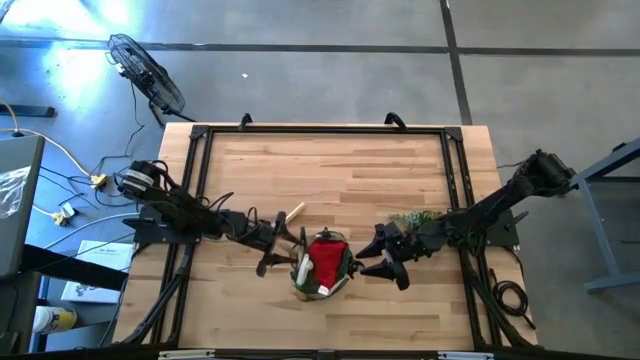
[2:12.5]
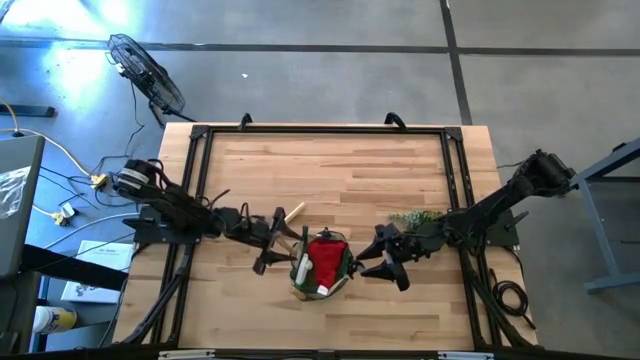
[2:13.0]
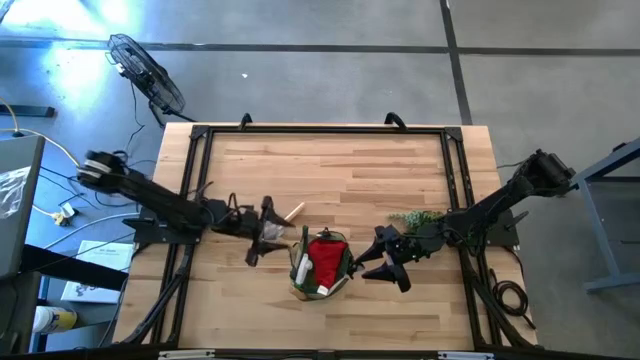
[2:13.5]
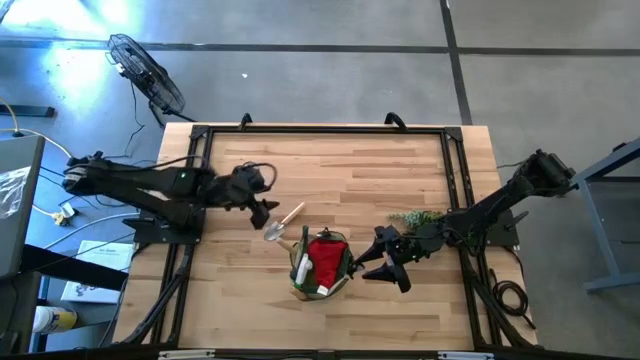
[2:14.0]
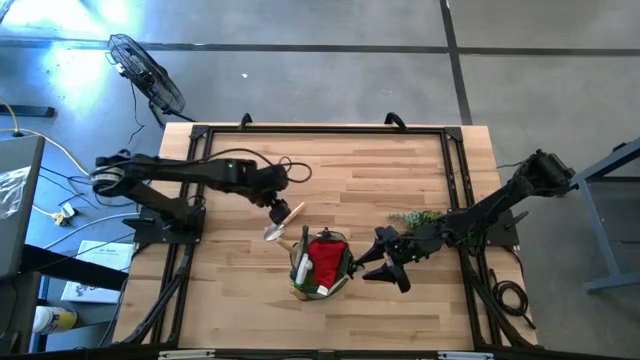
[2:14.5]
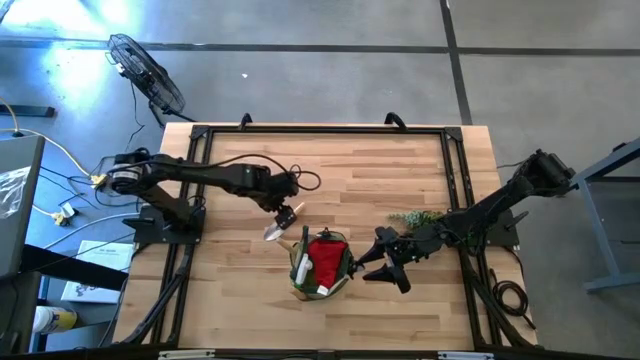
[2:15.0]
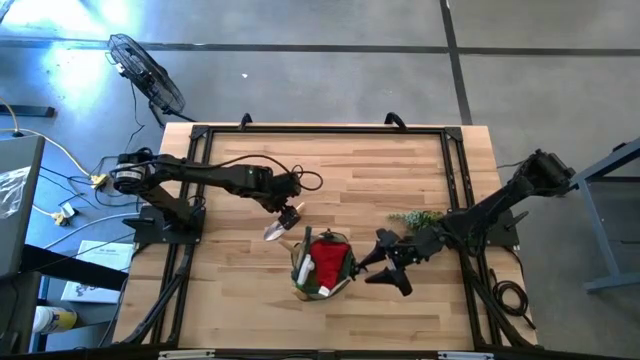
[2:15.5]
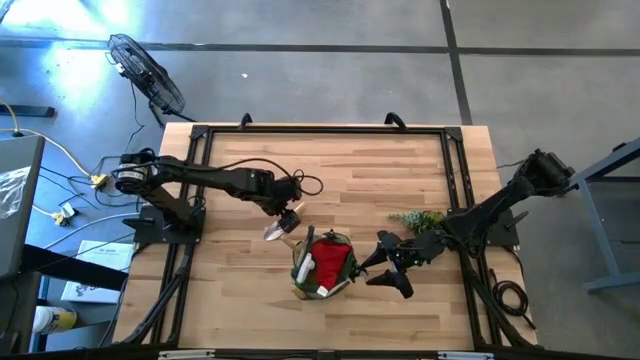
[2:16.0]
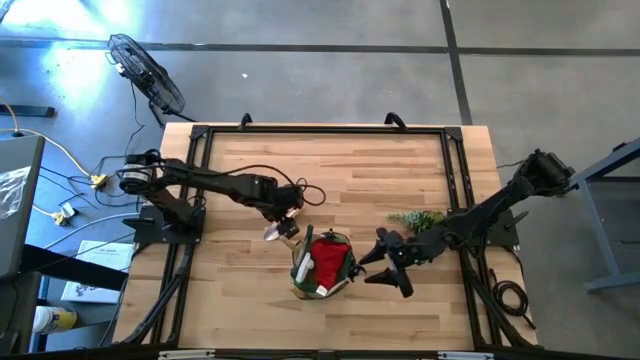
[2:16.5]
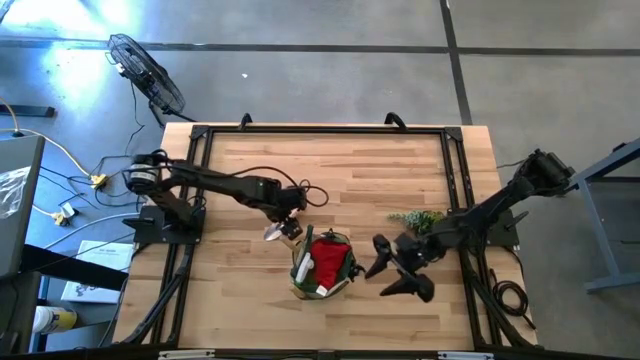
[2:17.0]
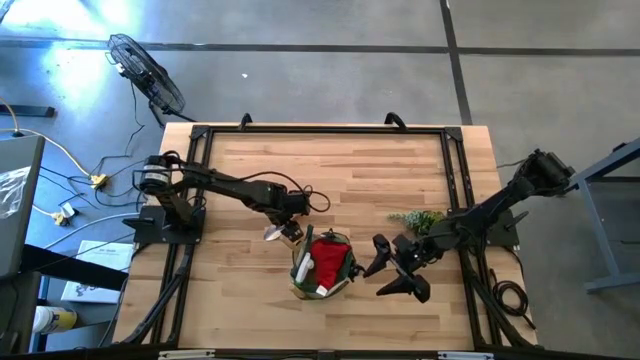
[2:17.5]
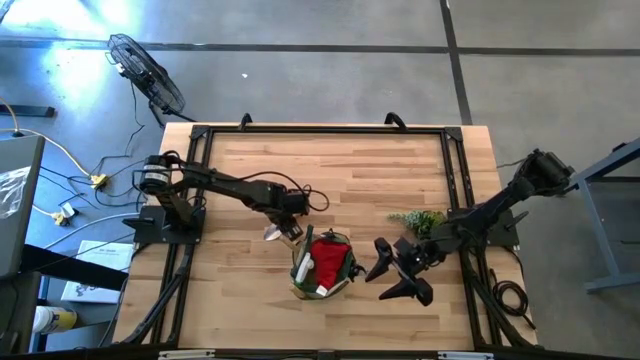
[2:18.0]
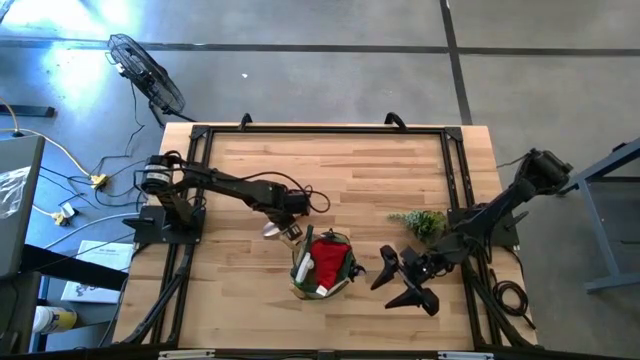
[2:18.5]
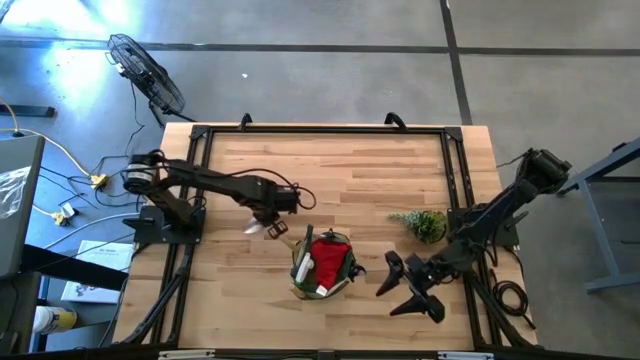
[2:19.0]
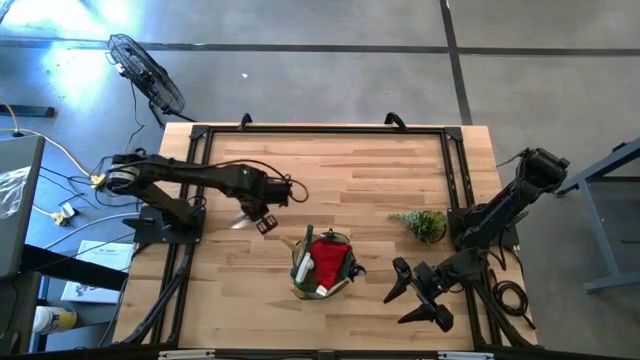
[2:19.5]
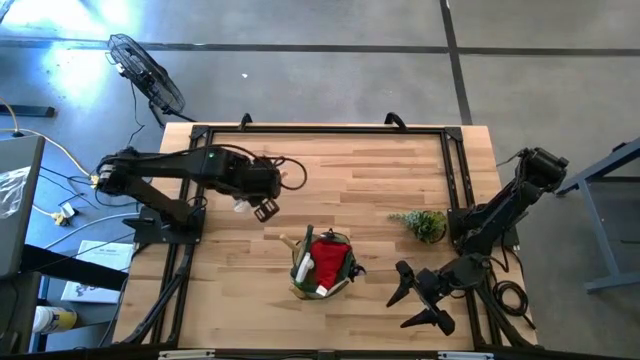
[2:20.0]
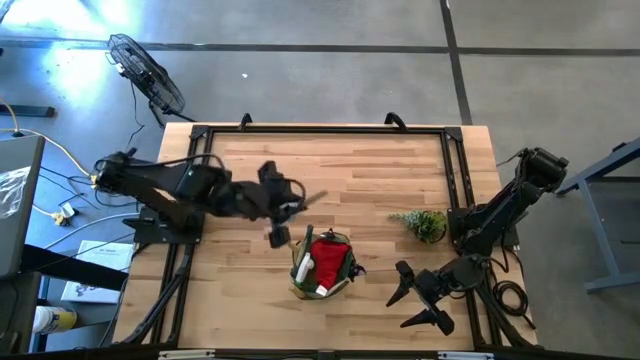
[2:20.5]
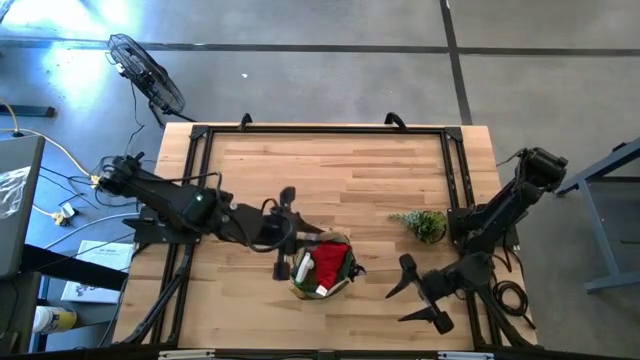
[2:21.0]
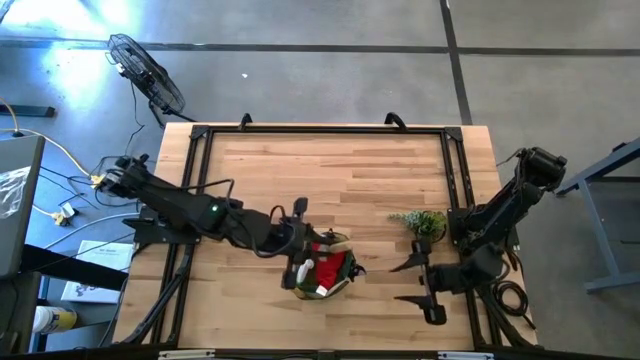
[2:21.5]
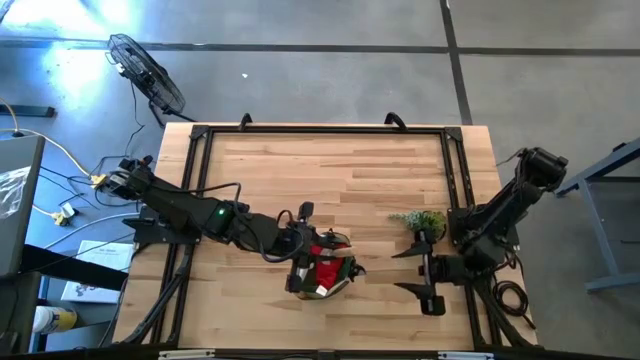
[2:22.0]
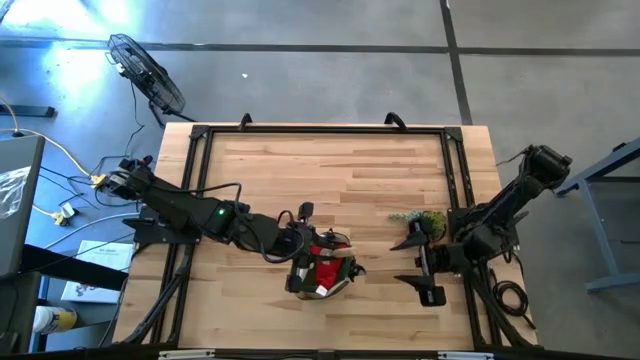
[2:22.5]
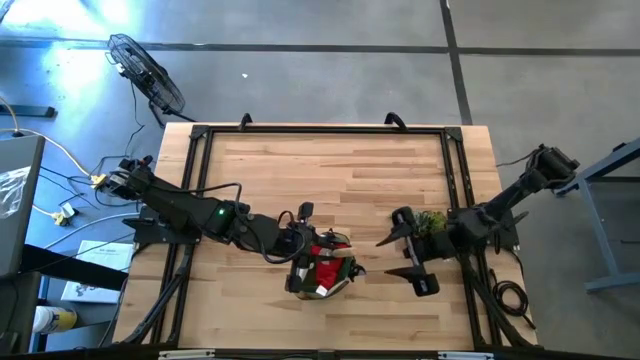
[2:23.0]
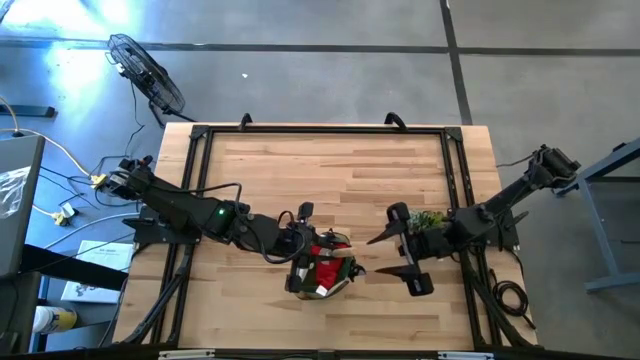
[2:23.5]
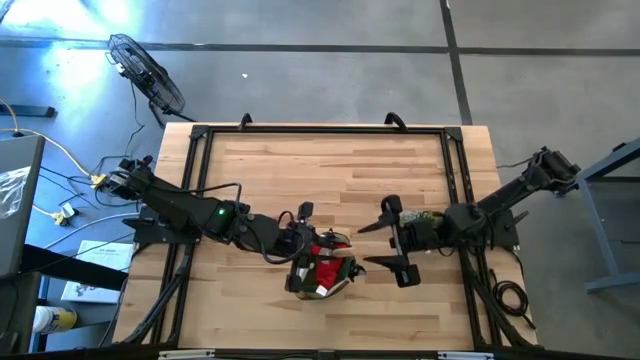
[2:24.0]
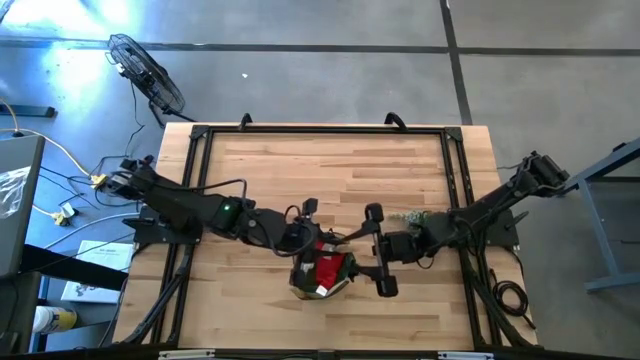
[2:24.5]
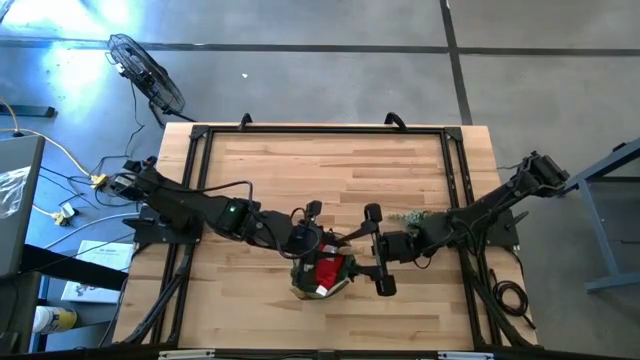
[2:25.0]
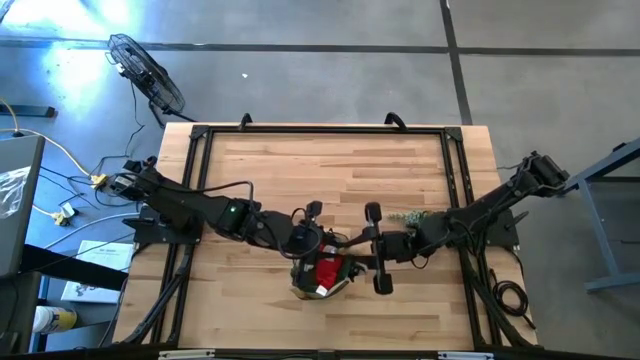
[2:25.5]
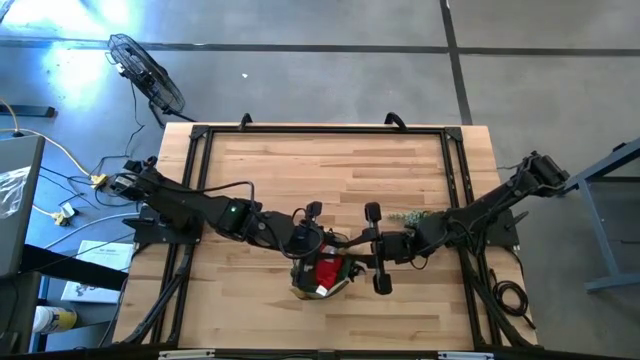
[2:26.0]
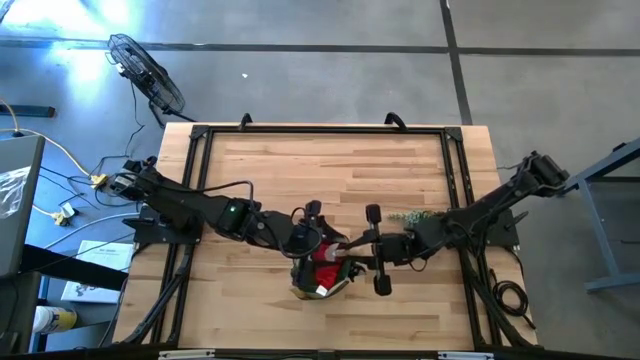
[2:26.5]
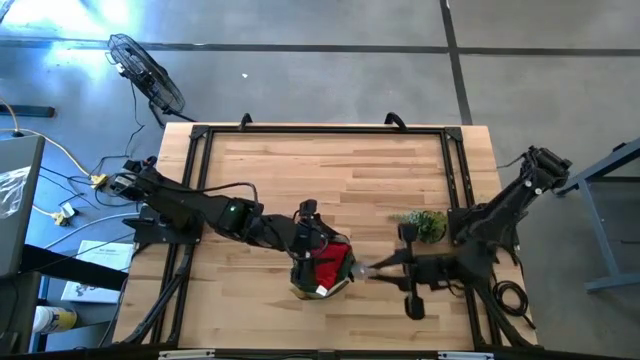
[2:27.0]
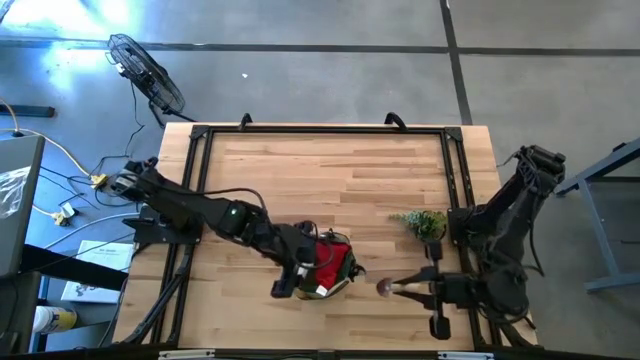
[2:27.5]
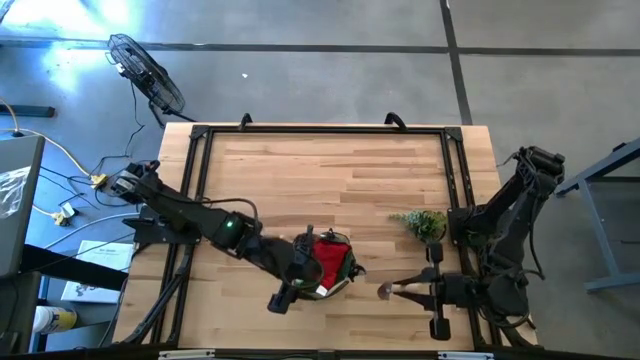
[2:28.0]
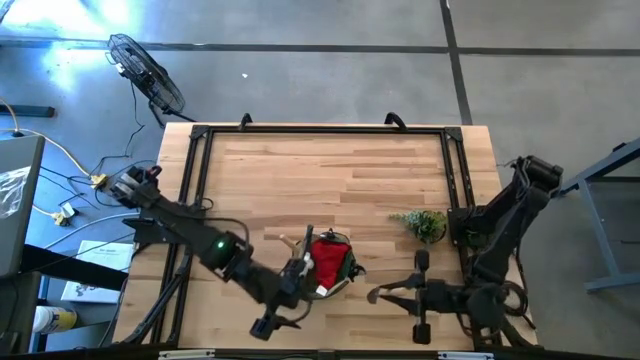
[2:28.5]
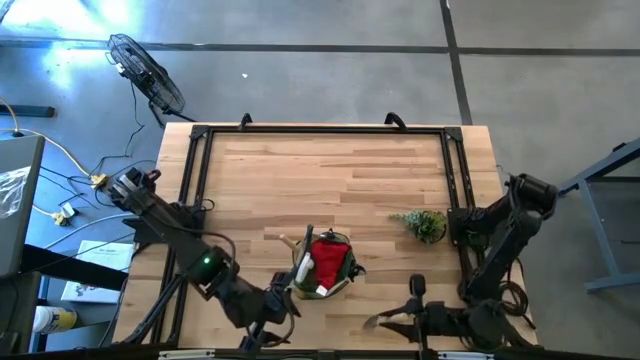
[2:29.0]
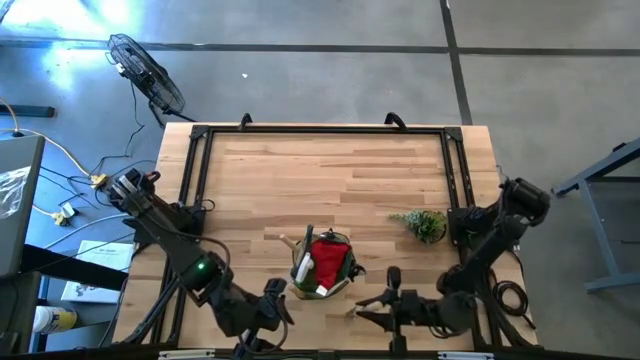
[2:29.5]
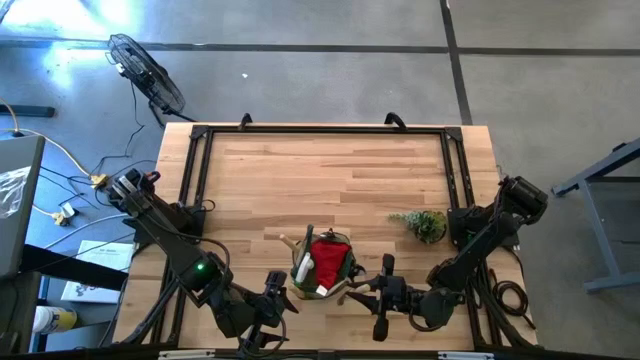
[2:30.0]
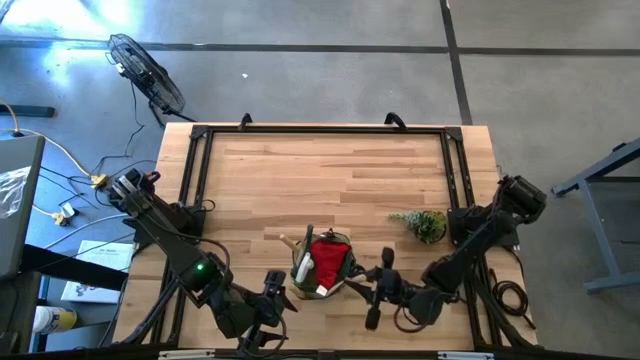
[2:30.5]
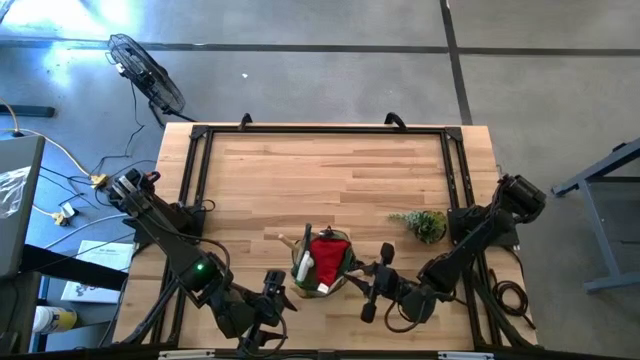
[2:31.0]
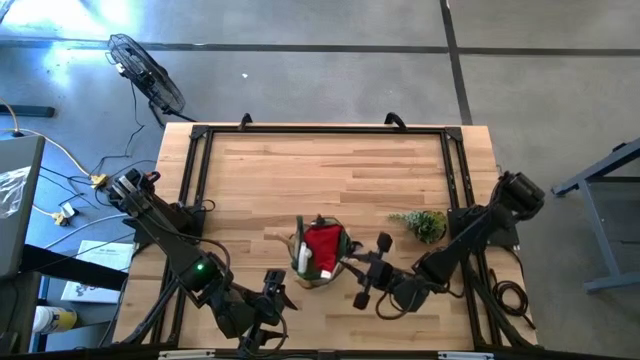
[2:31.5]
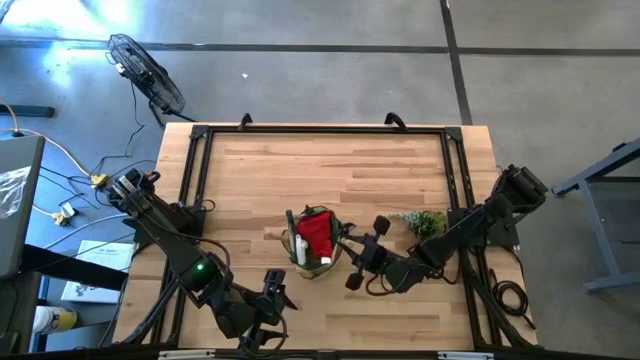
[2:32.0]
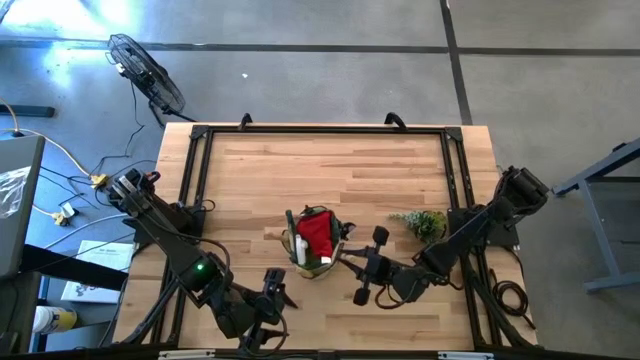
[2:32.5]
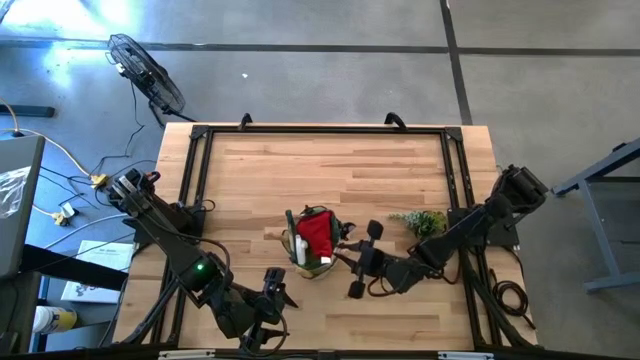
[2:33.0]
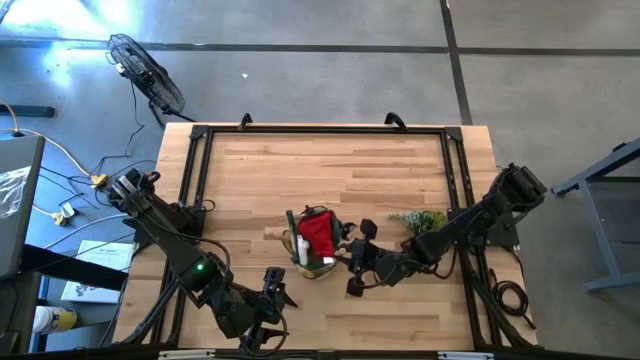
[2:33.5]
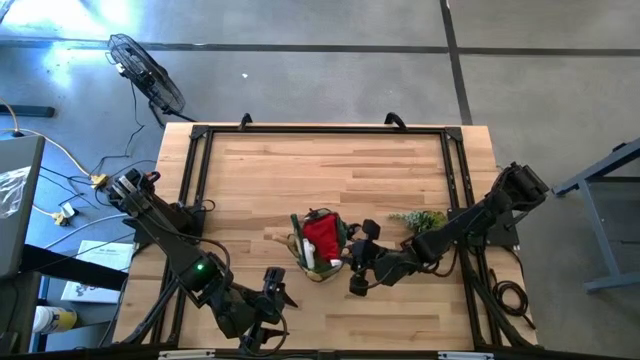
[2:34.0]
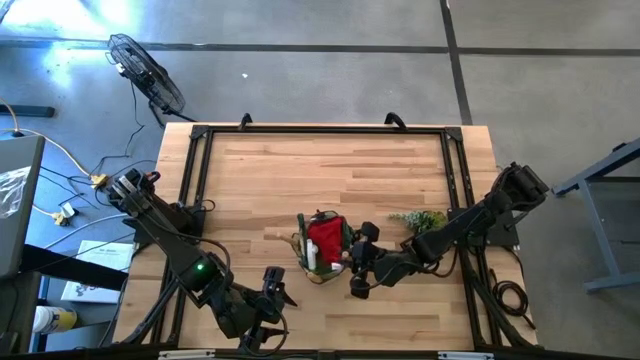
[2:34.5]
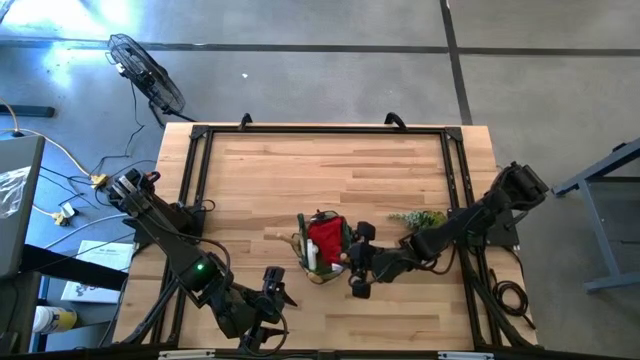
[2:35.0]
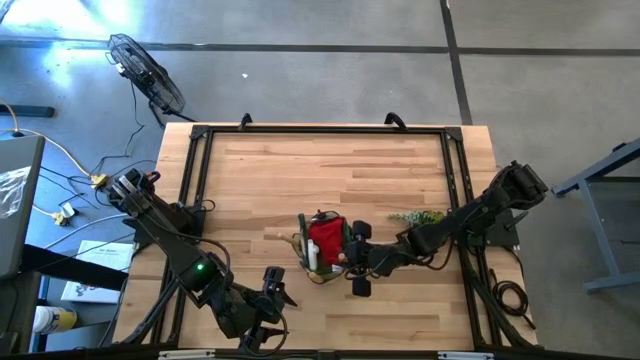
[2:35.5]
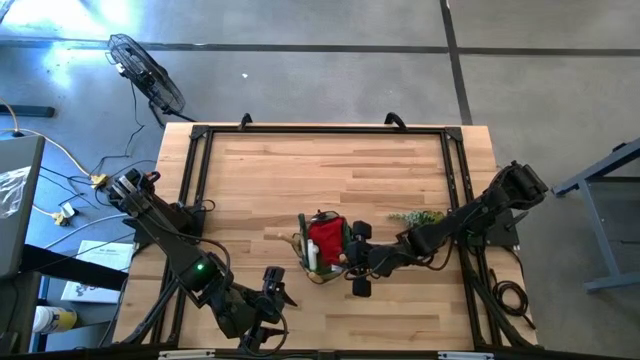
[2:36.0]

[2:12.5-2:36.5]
Task: Pick & Place Garden tools in Gardening bag
Put the brown trowel into the gardening bag
